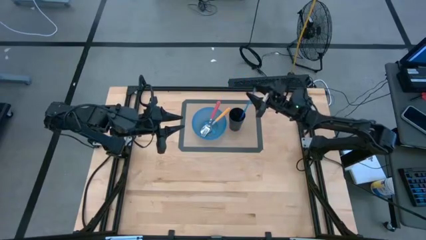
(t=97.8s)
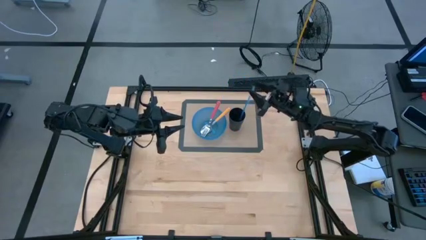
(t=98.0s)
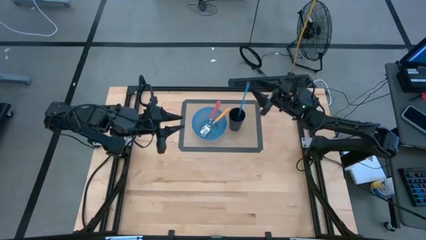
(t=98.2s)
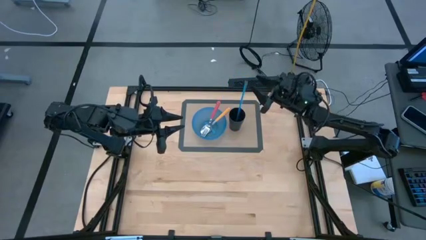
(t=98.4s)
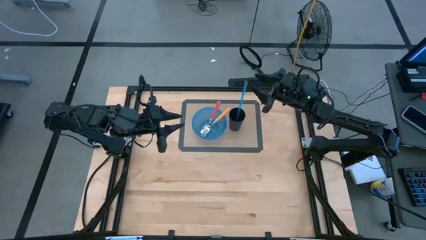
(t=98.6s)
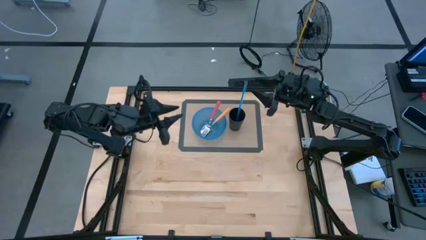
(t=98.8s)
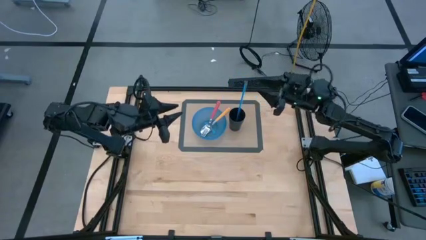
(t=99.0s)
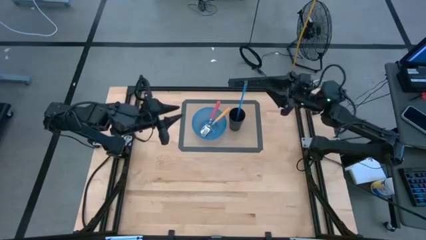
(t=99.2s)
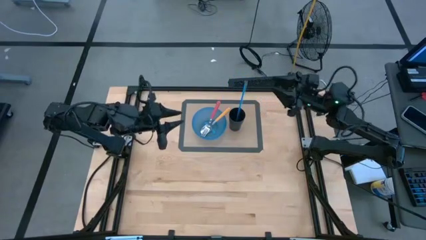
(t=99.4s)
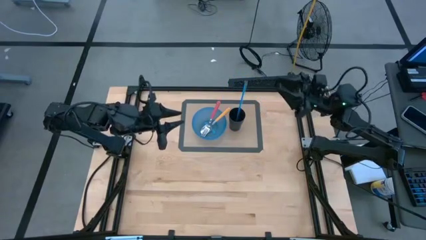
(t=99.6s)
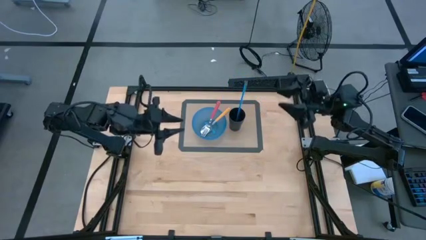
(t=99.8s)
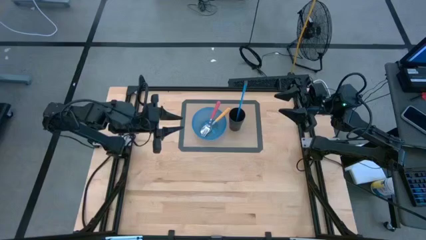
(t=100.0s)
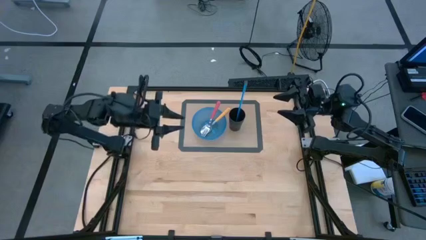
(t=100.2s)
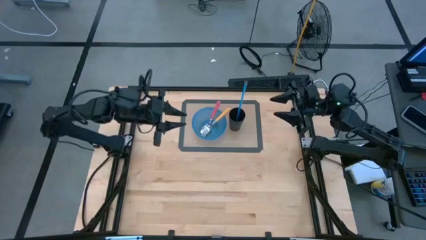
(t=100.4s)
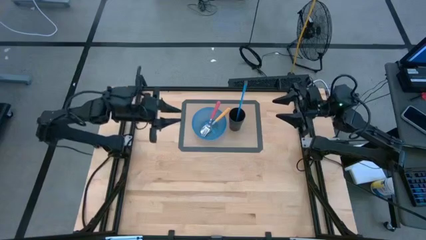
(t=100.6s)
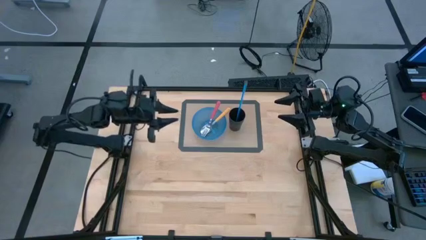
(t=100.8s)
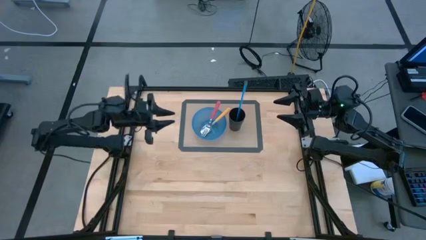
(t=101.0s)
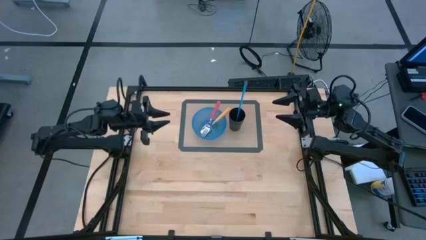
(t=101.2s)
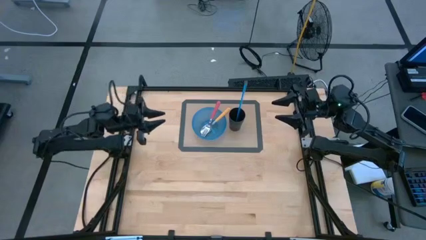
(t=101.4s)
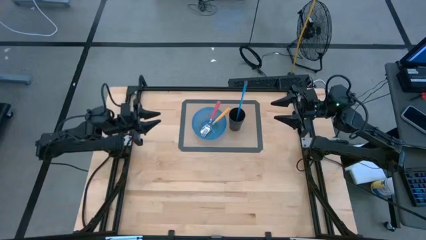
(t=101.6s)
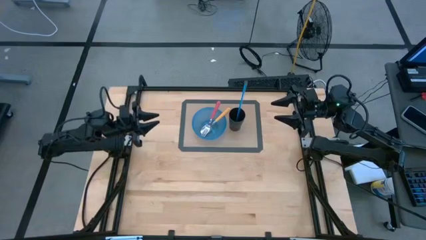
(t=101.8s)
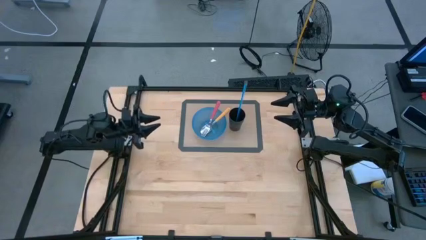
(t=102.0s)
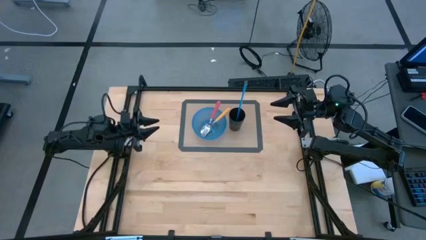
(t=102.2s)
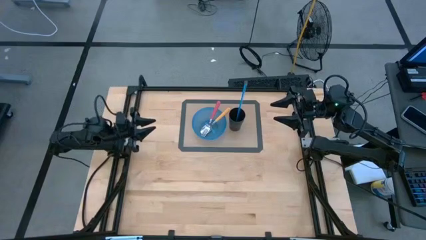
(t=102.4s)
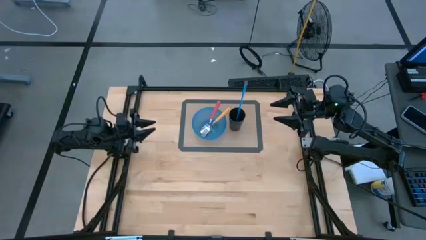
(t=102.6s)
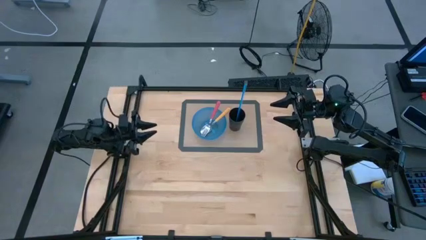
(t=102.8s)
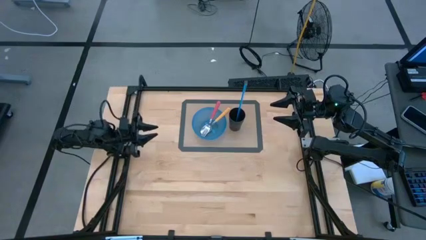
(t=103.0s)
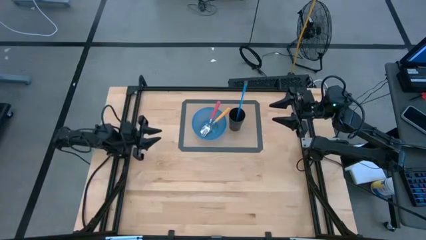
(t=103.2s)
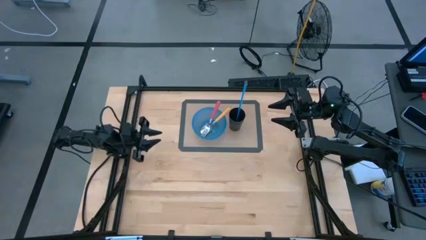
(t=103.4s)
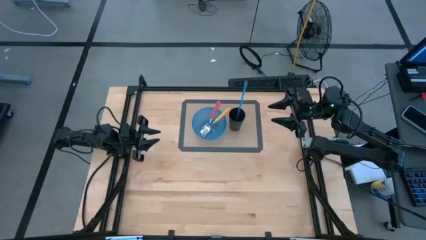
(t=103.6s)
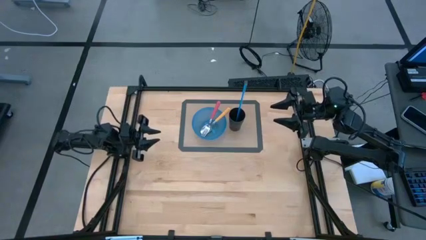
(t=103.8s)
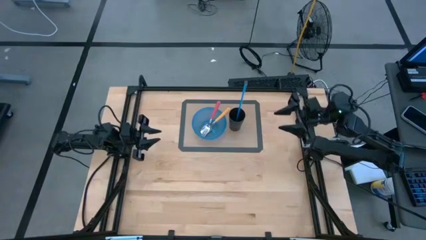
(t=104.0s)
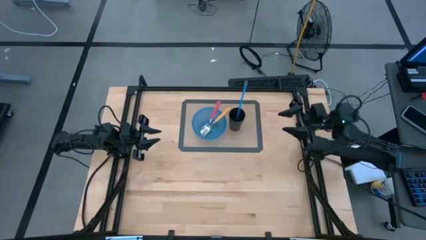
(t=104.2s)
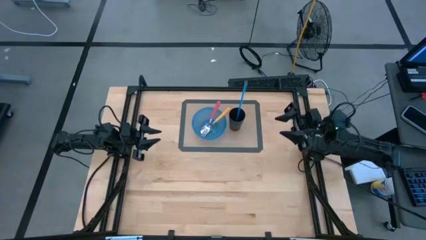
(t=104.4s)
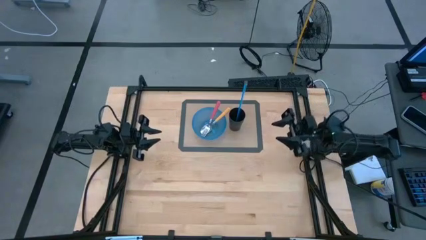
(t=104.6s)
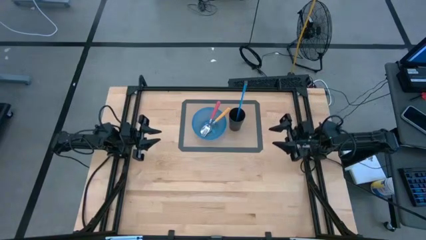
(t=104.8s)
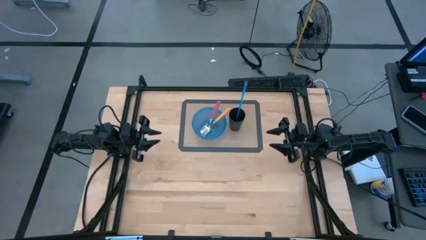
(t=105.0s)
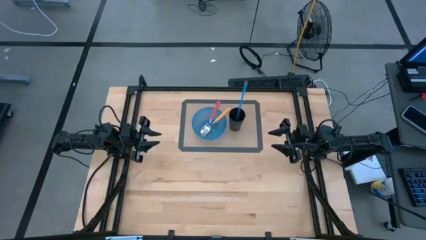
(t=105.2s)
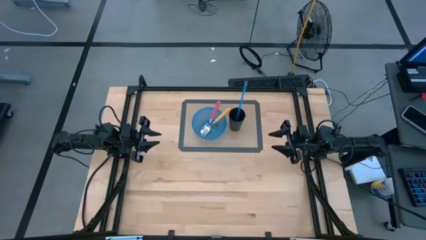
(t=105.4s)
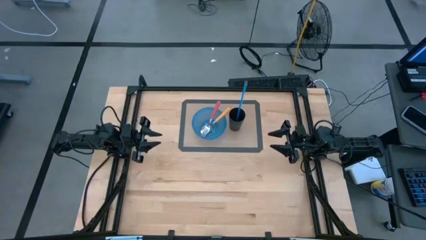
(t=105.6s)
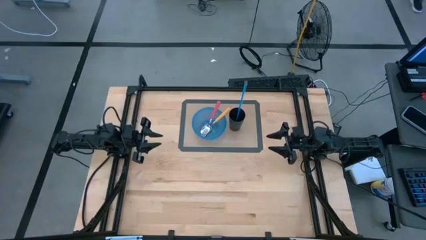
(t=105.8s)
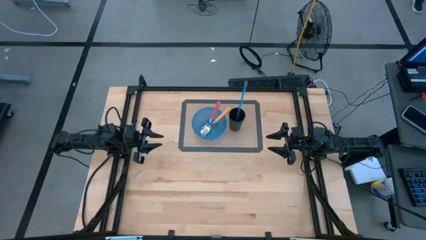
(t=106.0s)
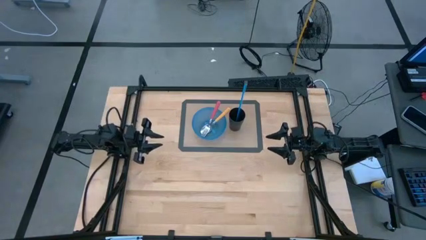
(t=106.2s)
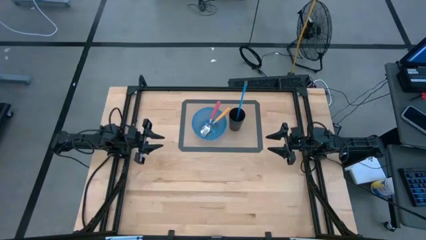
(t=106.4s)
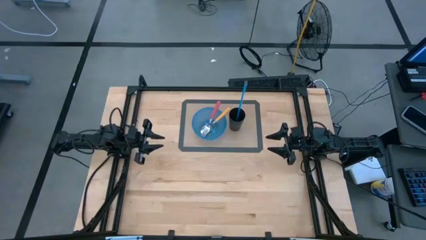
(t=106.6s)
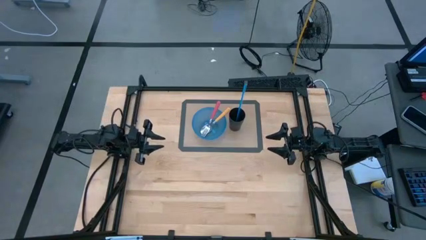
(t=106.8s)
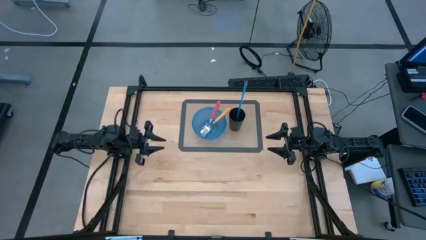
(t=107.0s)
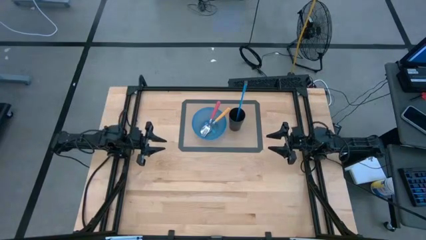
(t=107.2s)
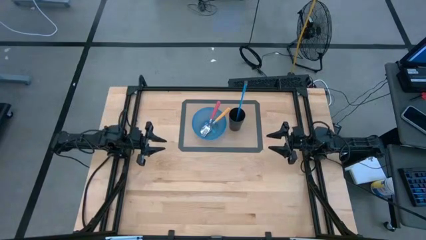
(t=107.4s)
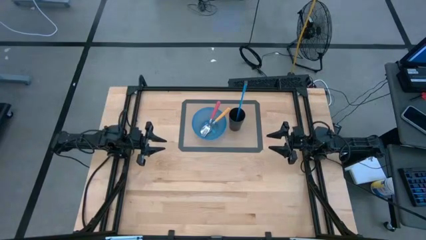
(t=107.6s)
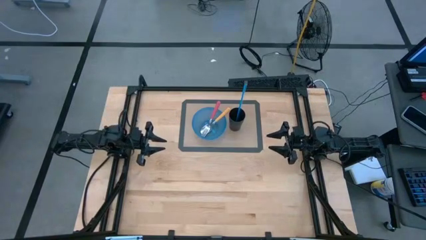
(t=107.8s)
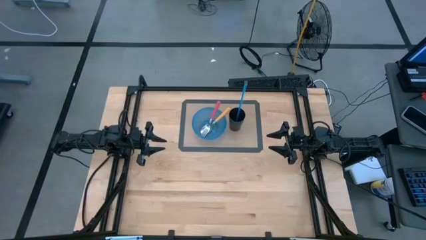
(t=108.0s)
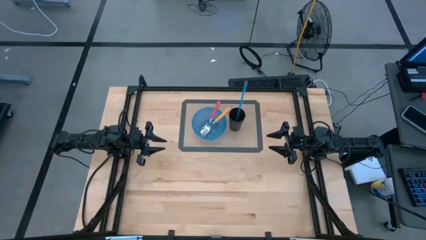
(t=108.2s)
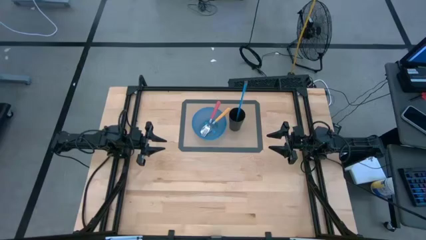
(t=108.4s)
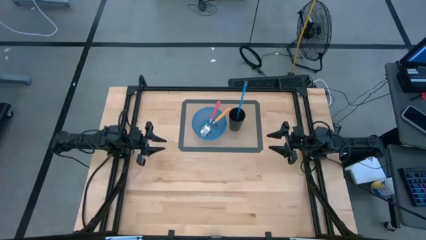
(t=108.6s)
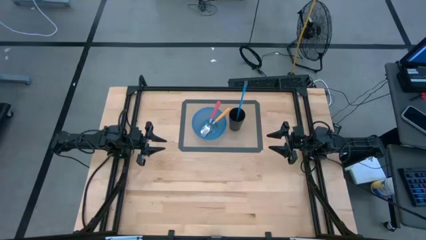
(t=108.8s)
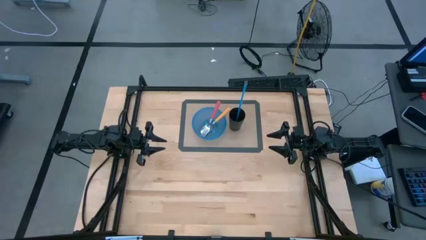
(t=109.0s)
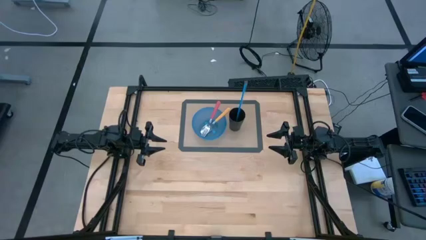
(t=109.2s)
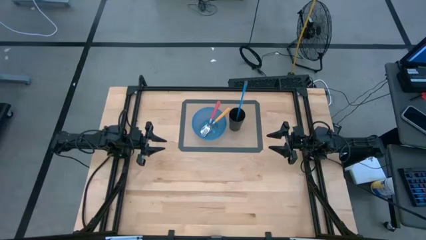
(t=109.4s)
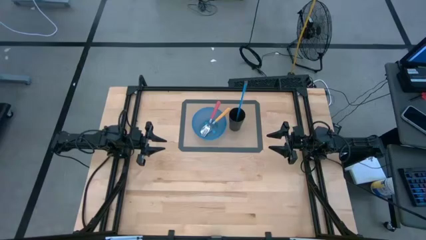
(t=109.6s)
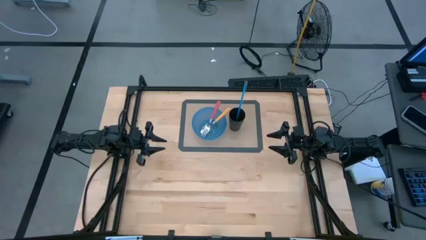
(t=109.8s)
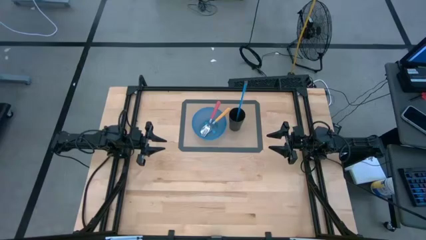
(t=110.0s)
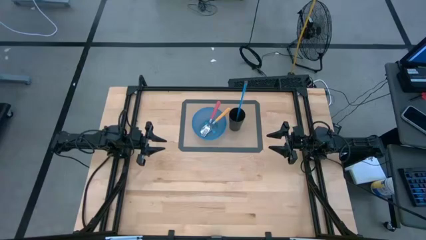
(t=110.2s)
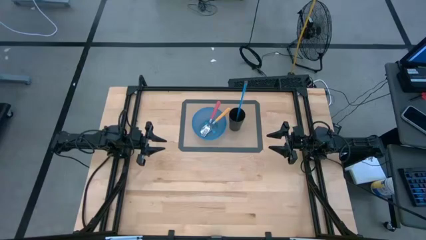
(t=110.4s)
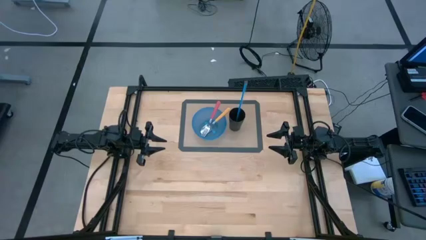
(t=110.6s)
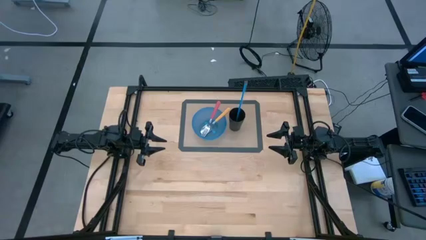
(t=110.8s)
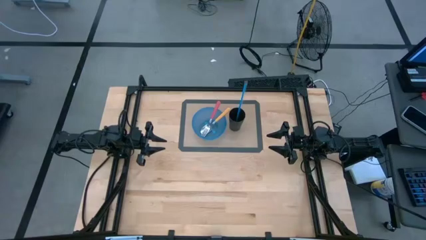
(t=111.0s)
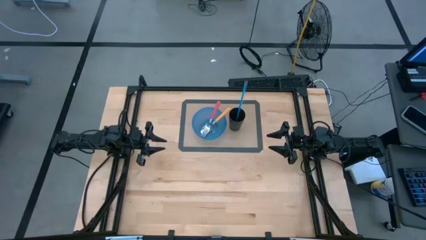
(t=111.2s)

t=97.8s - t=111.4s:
Task: Pick & Place Utensil
Return to Home Position
